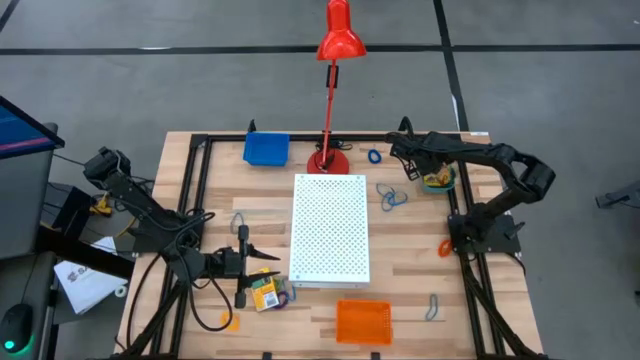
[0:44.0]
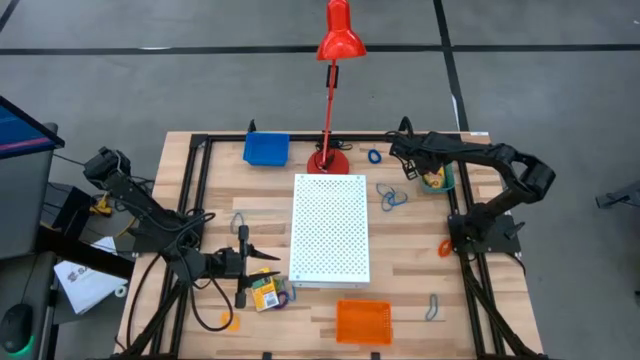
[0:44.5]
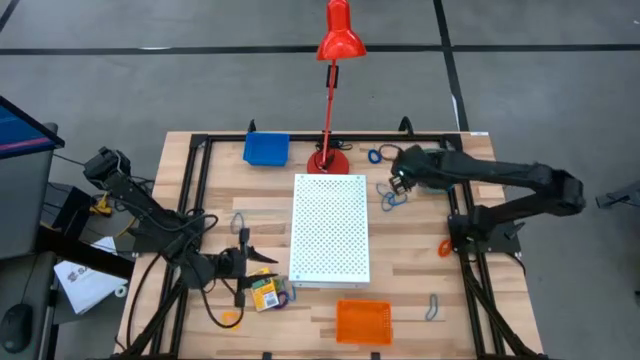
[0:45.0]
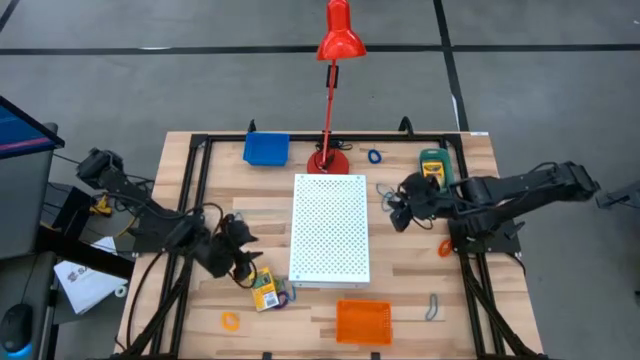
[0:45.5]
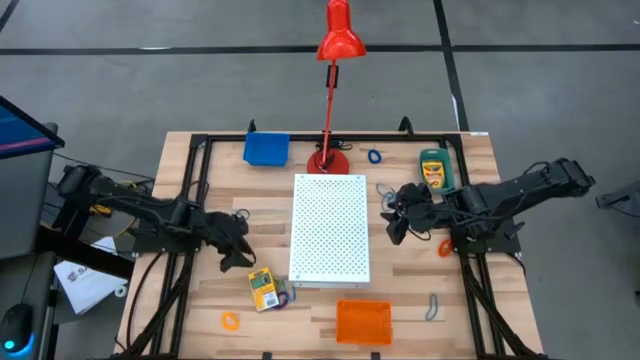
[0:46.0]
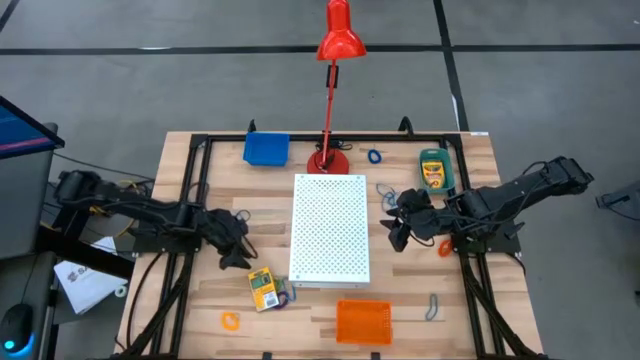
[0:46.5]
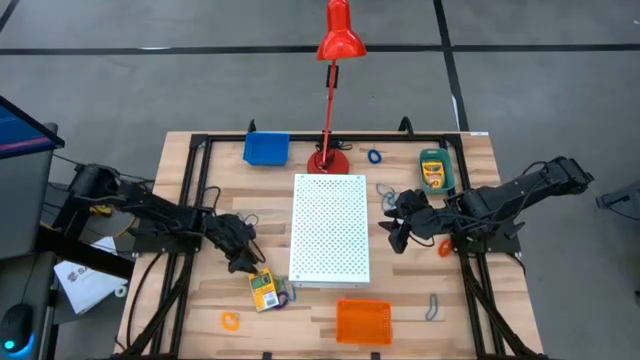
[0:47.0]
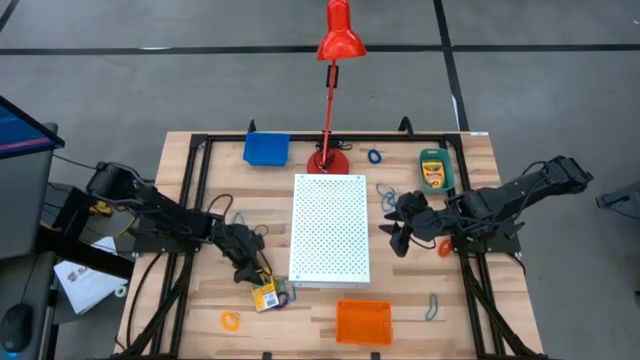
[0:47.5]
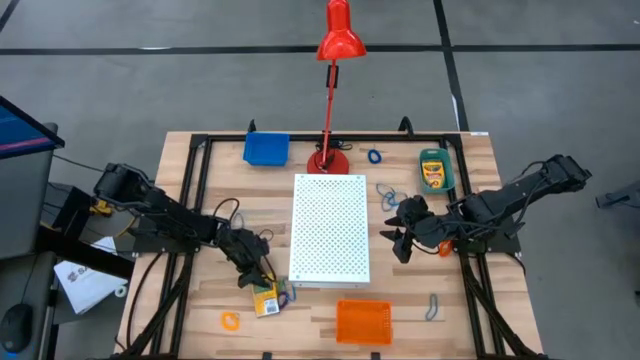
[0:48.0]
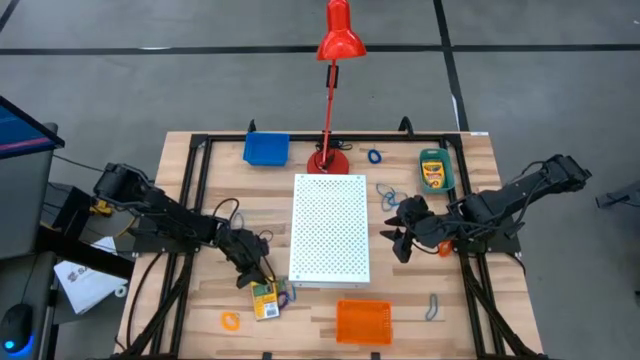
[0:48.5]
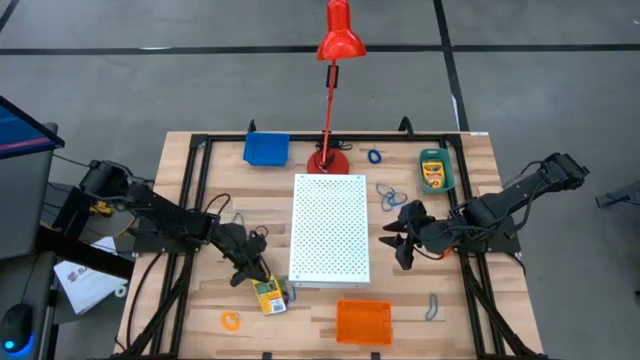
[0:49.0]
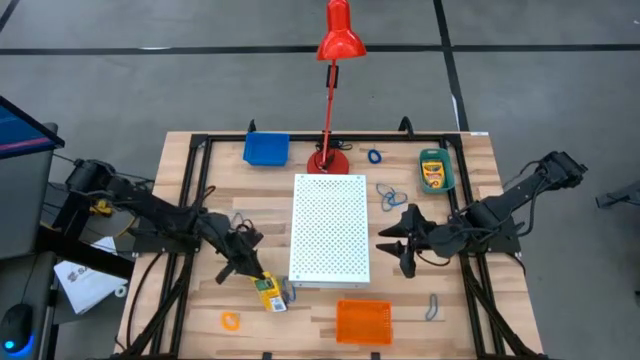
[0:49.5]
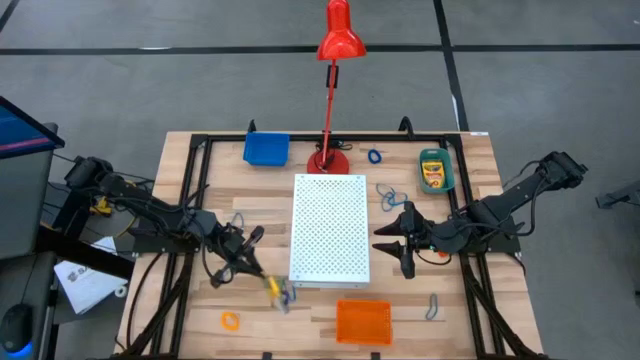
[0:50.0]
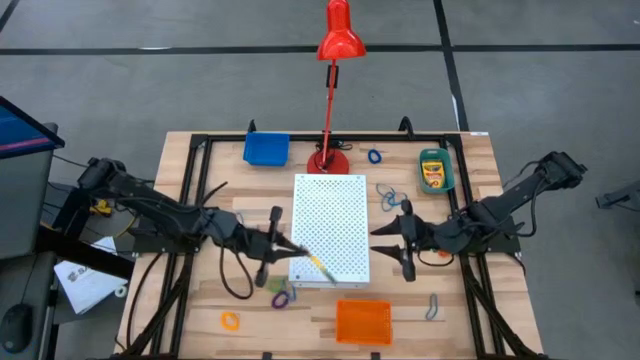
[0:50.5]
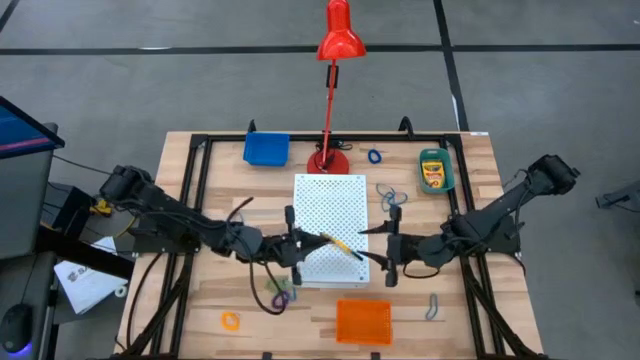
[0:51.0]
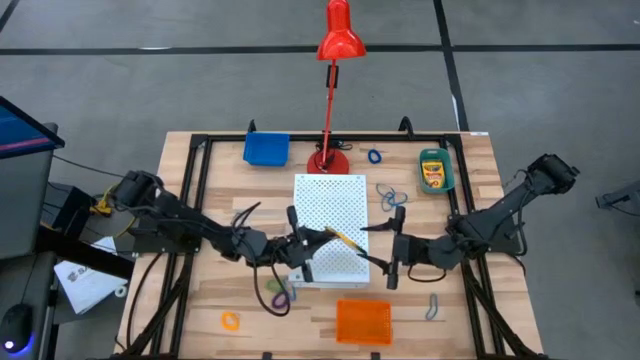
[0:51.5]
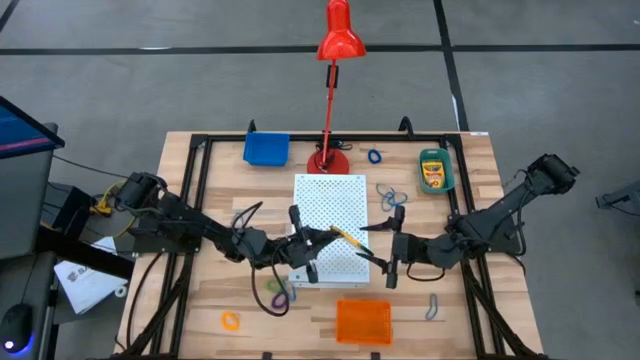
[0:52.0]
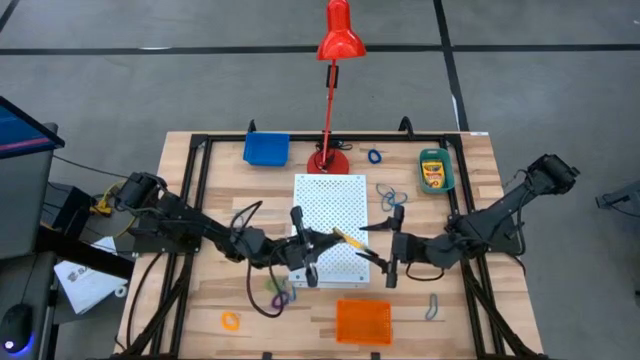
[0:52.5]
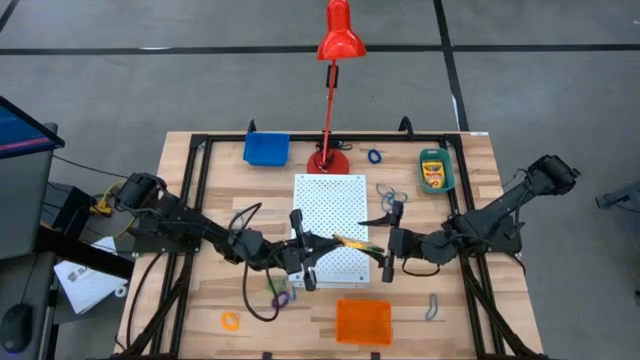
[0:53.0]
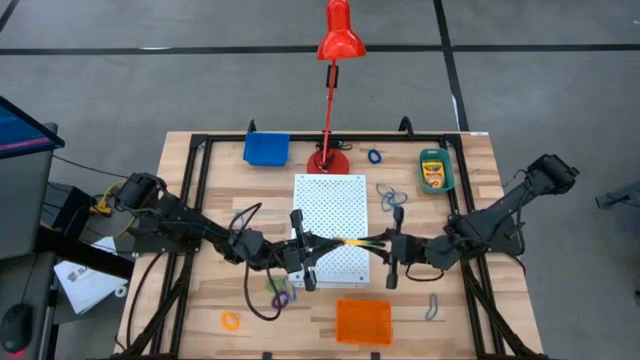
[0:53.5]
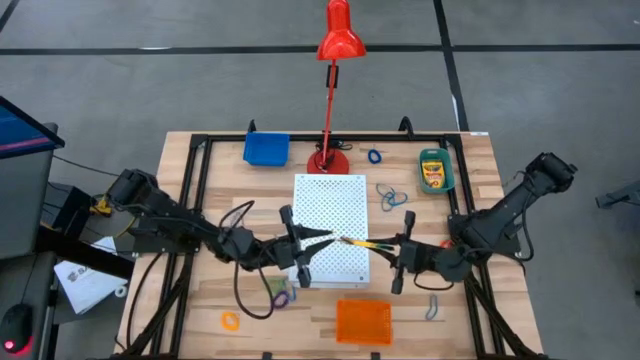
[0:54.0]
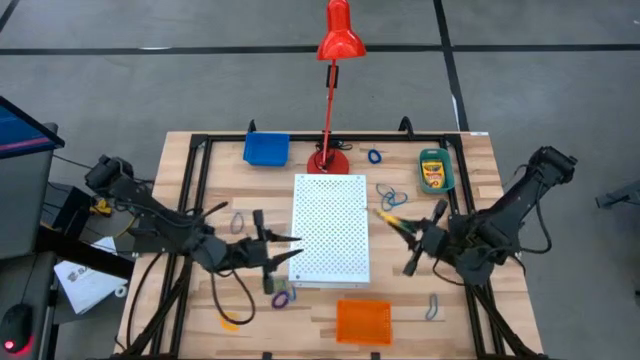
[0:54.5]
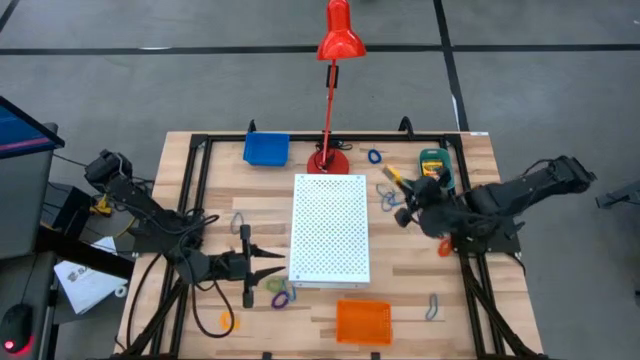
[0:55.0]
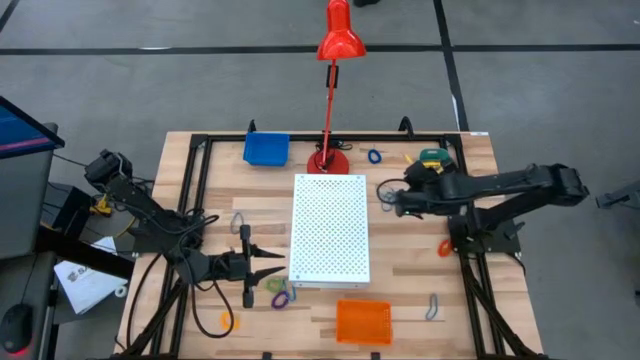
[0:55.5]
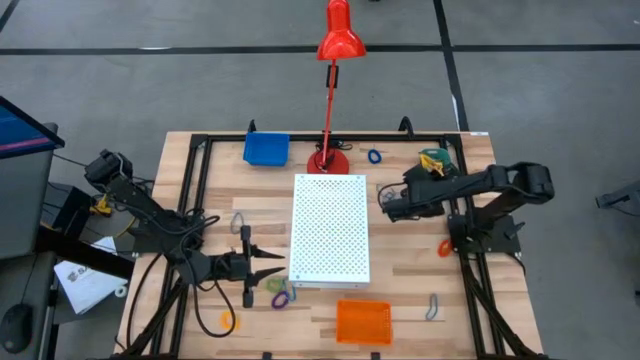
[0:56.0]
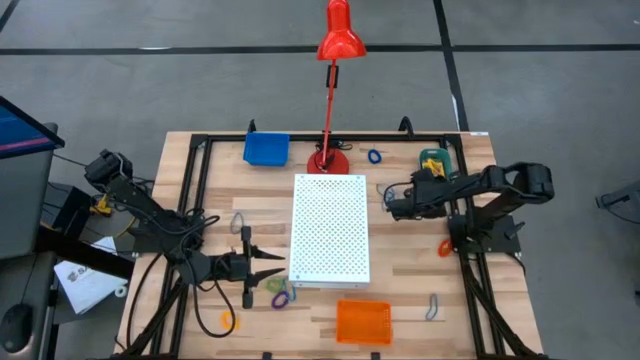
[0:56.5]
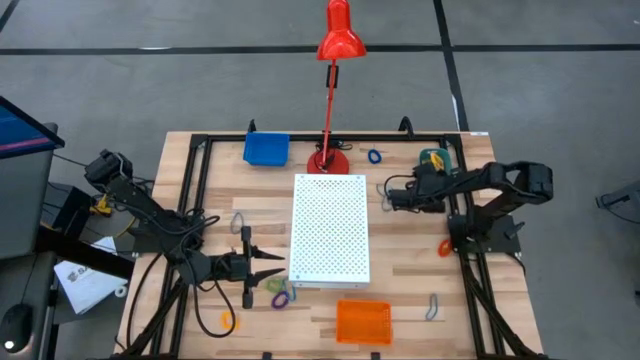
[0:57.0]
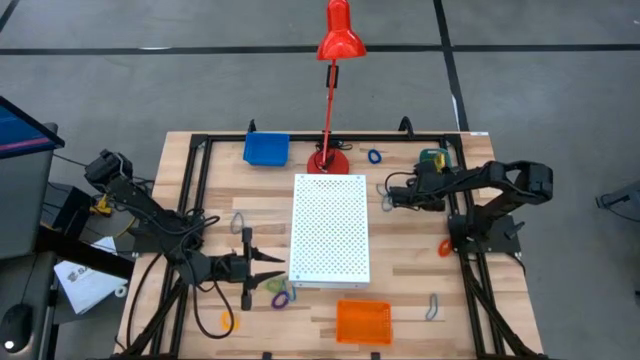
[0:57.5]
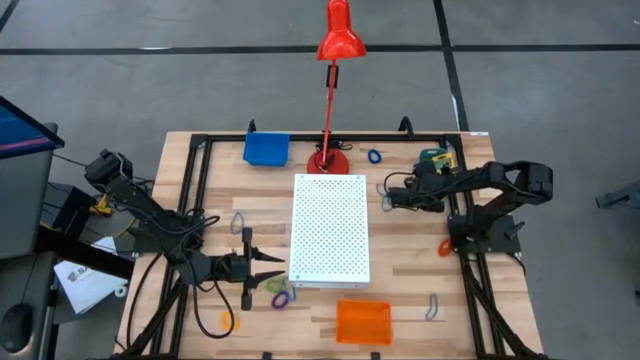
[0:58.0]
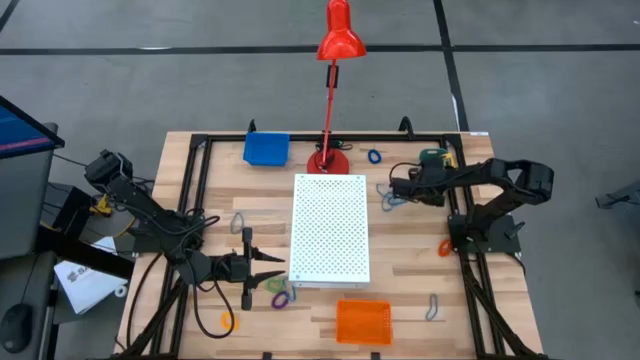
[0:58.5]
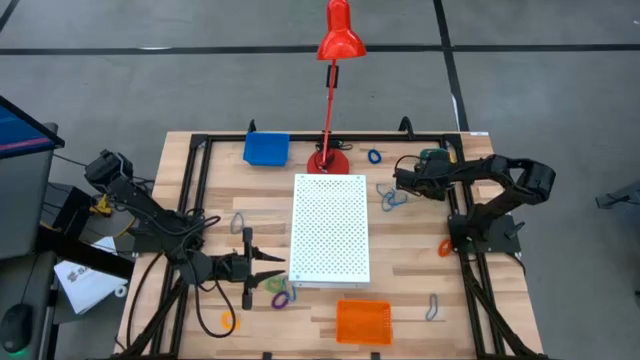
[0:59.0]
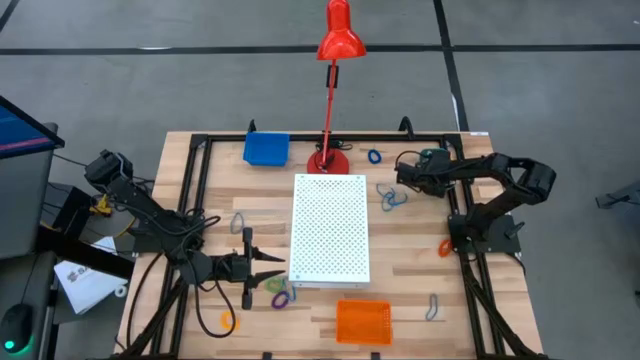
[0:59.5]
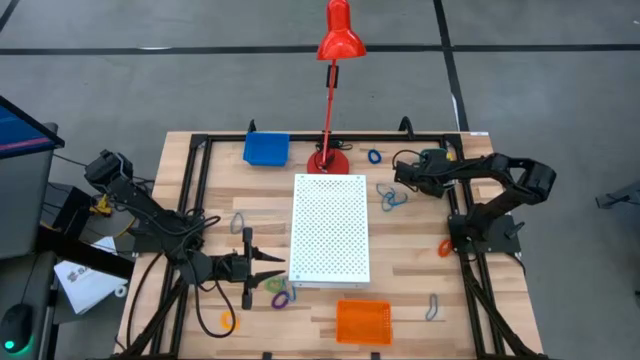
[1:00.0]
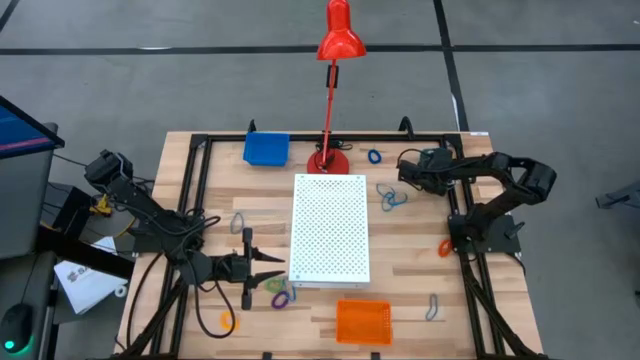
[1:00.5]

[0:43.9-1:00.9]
Task: Pick & Place Office Desk Supplies
Put the yellow crayon box into the green bin

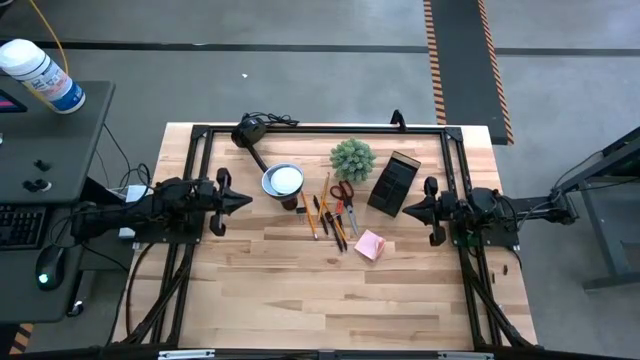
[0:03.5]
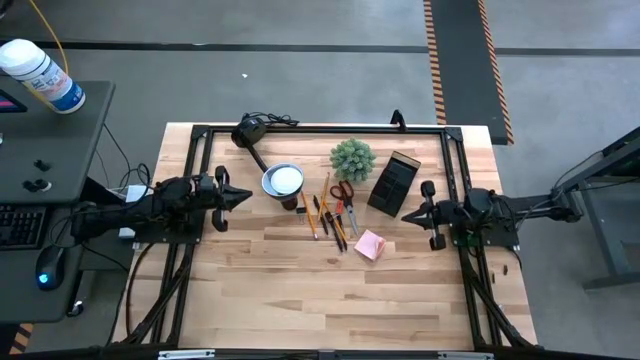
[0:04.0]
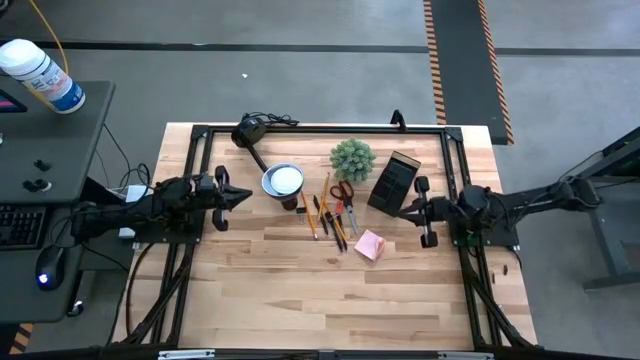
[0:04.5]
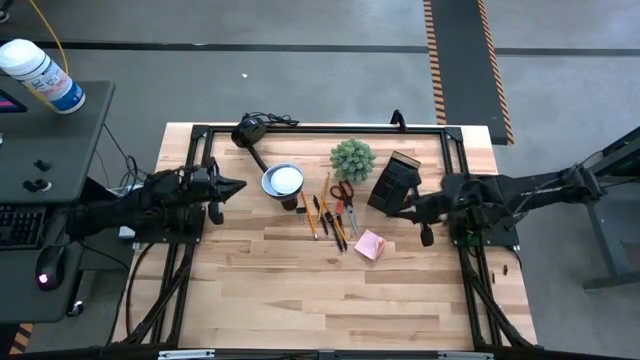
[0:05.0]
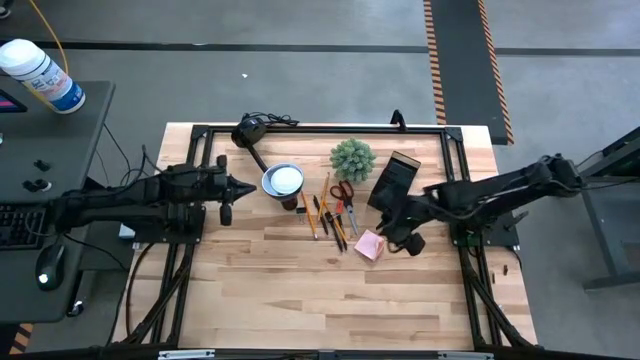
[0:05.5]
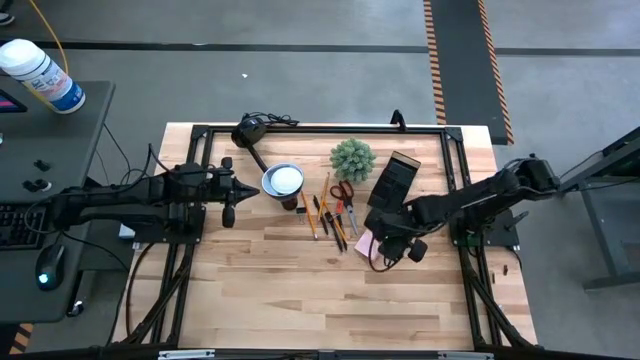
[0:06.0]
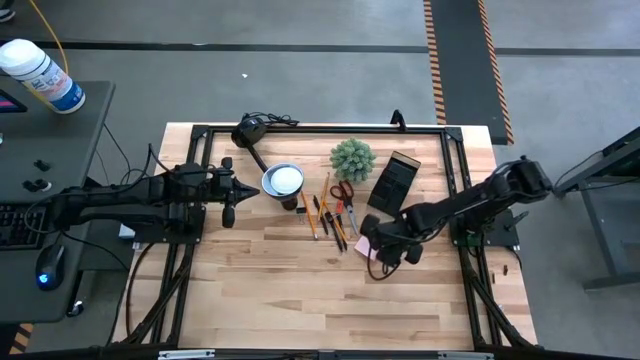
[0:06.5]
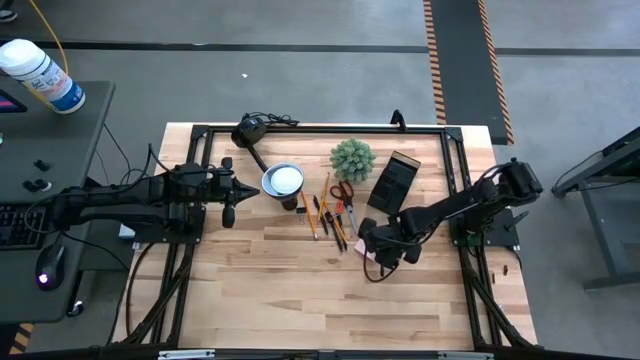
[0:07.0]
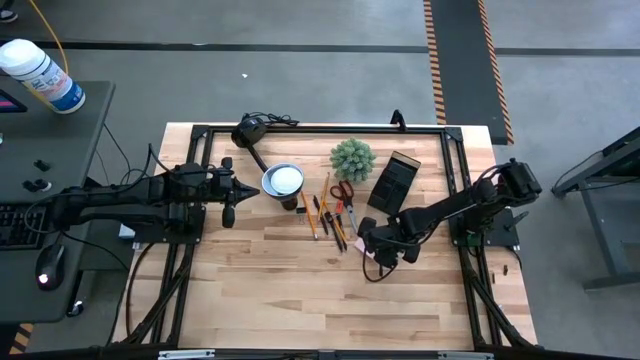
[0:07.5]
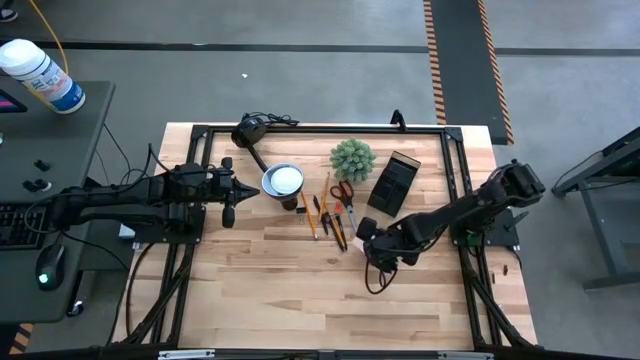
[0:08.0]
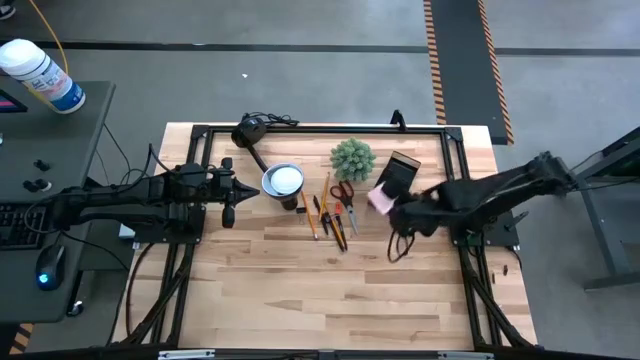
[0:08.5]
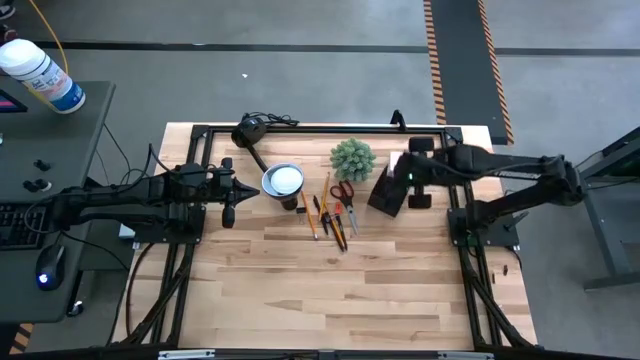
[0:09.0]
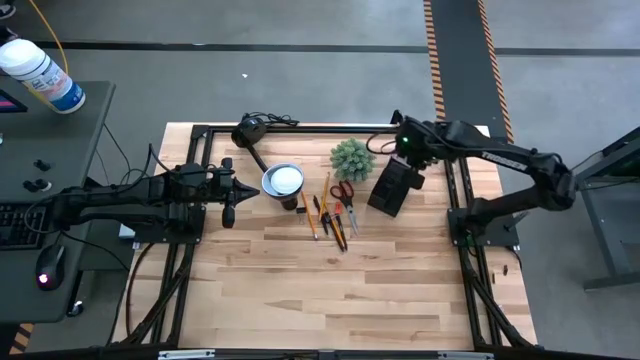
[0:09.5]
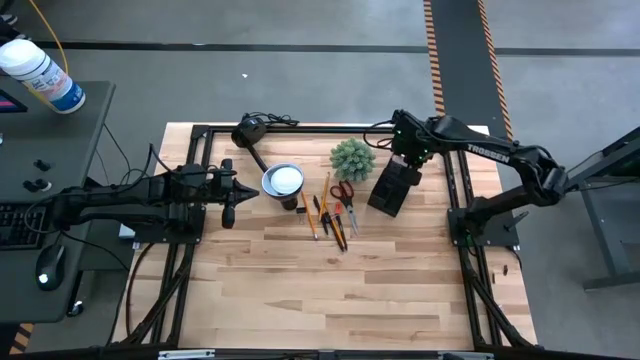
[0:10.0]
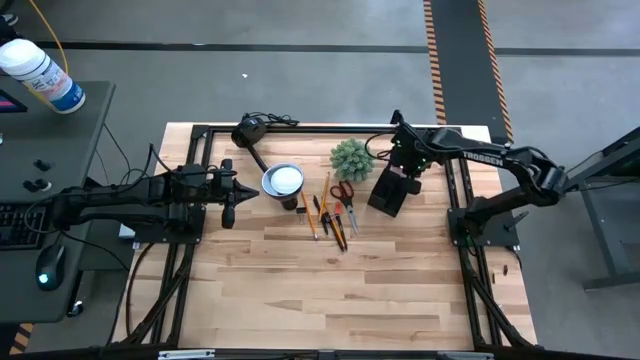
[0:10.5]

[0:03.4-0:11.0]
Task: Pick and place office supplies into organizer
Put the pink sticky notes into the desk organizer
